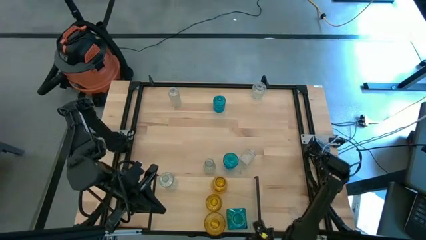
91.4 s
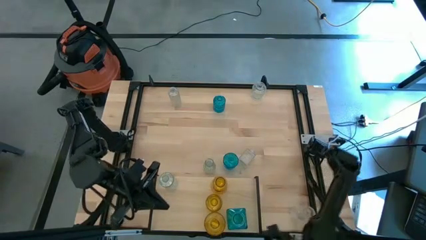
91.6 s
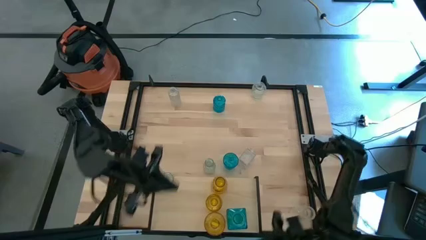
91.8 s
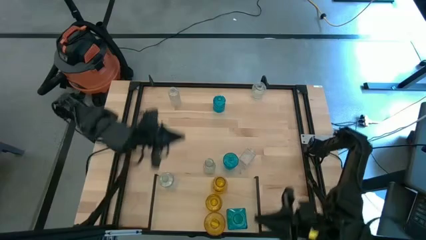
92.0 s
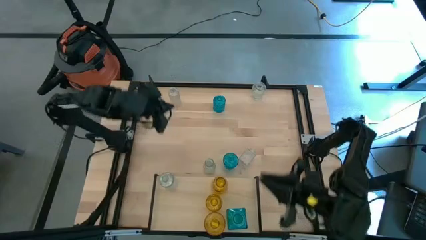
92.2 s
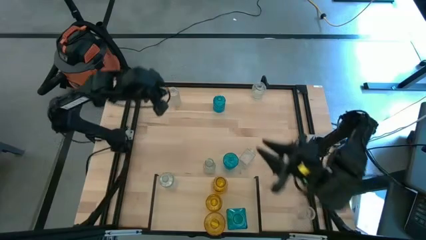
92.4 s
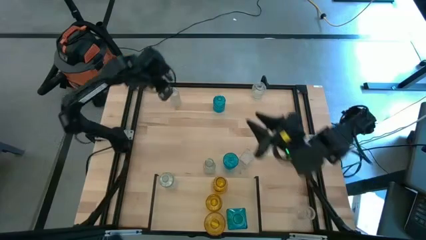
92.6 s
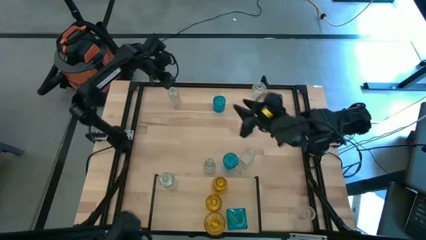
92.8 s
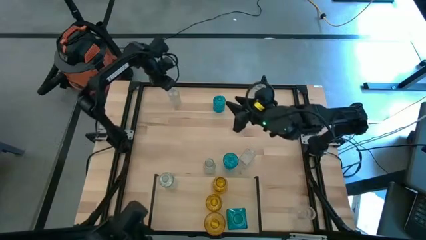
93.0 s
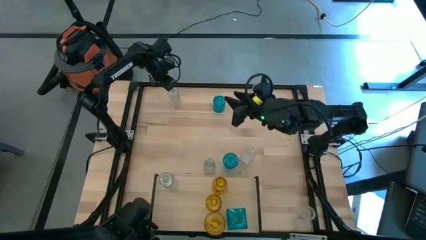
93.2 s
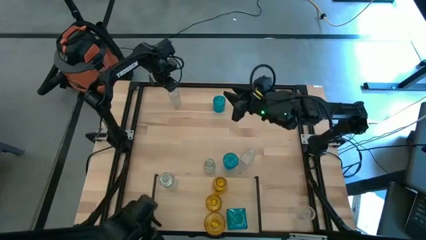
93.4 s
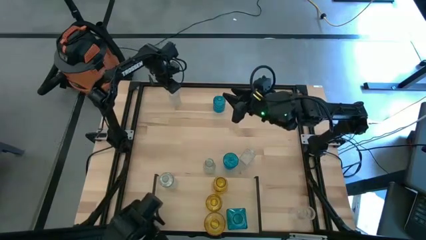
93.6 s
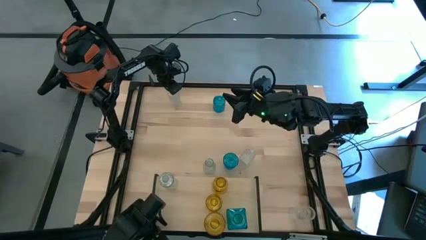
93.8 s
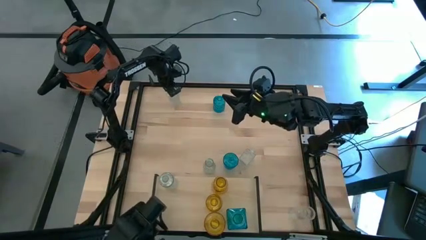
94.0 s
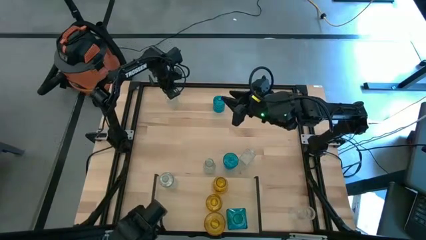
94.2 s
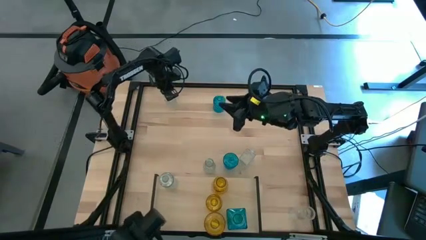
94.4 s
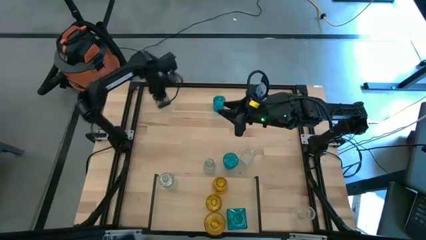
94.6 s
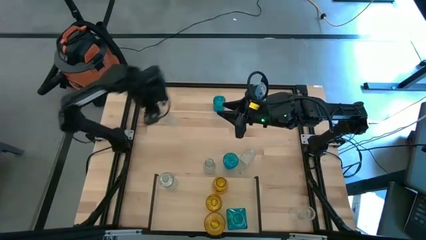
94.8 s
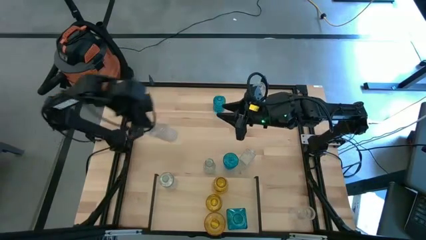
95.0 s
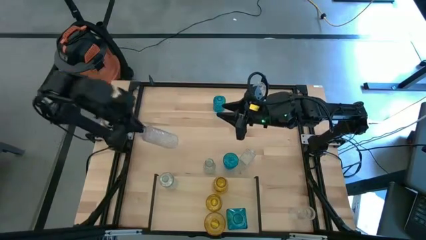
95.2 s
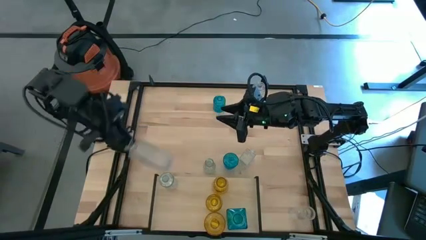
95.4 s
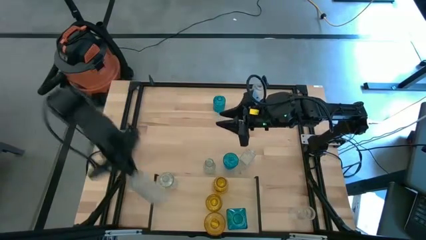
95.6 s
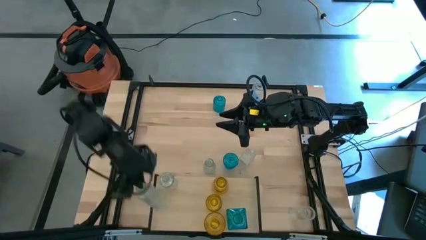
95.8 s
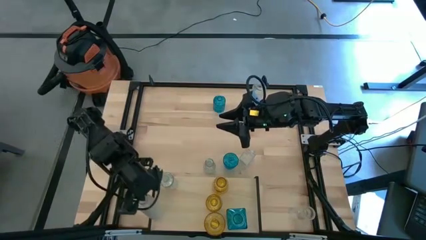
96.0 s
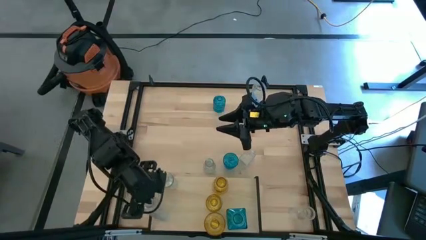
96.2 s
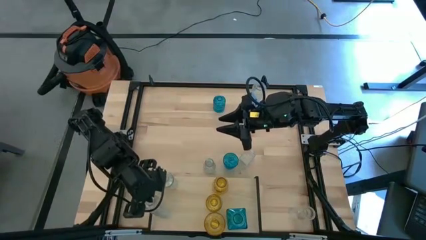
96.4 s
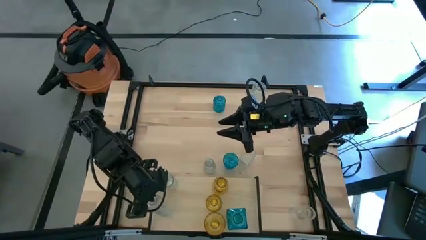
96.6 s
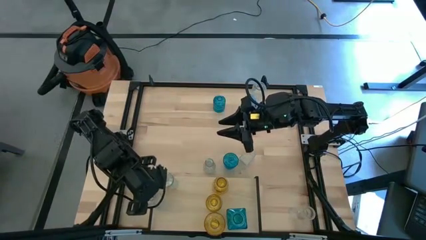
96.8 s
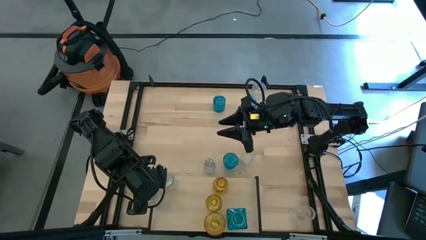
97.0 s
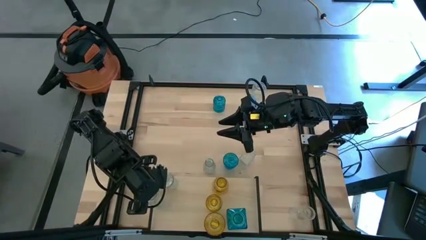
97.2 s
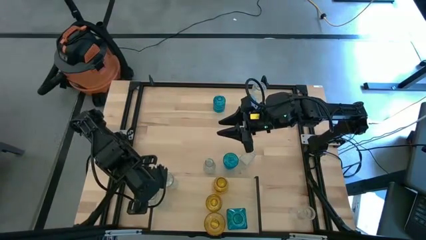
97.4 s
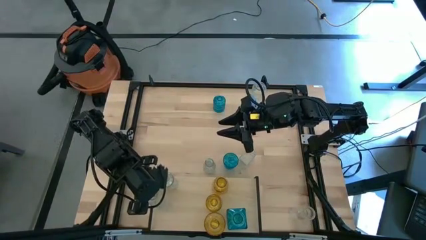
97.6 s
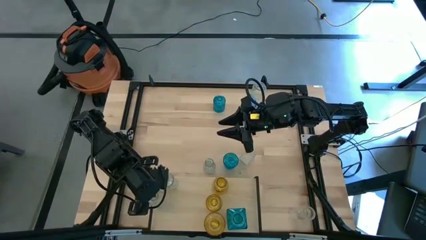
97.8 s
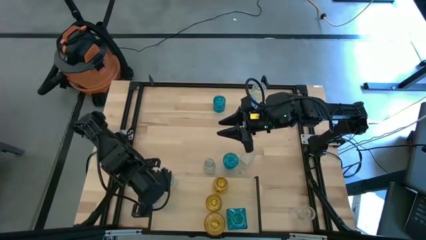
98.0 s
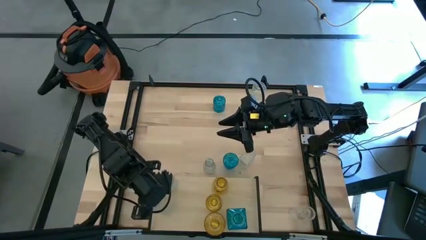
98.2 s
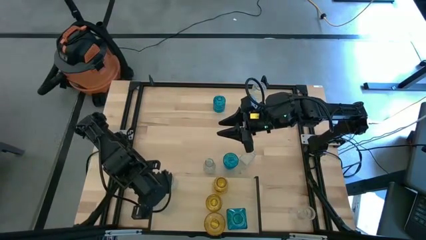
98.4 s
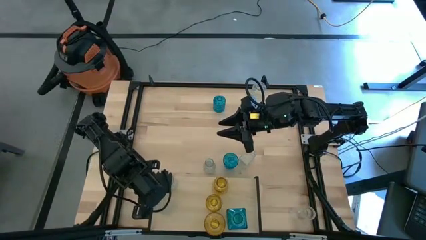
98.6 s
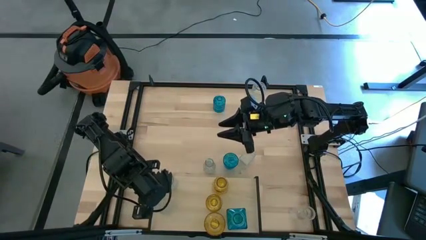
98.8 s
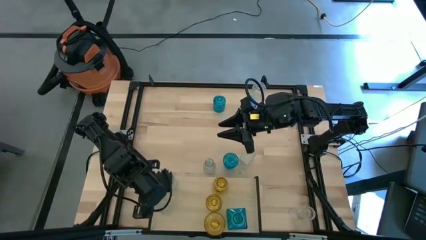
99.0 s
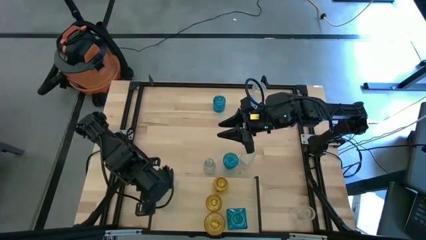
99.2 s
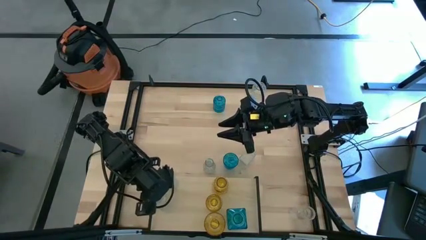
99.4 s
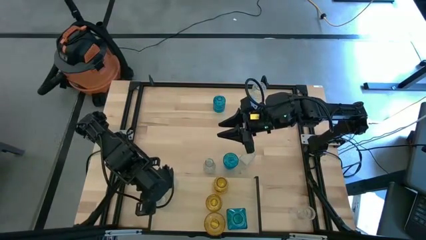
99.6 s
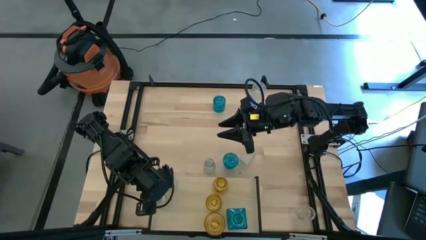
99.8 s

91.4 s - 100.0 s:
Task: sort vases onto shelf
Put the transparent vase on the shelf aligned with the other transparent vase

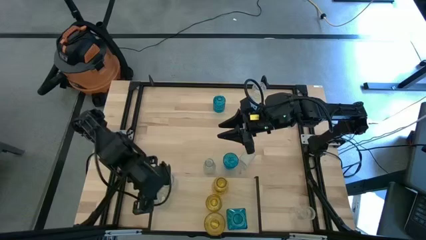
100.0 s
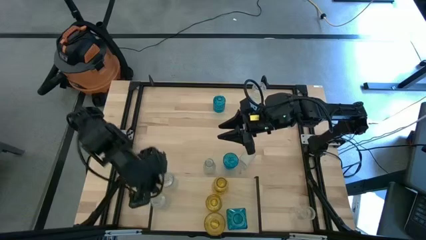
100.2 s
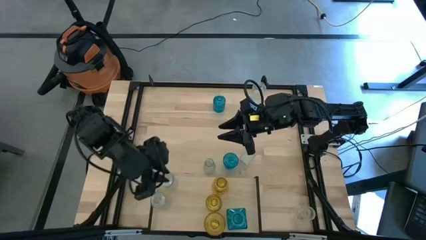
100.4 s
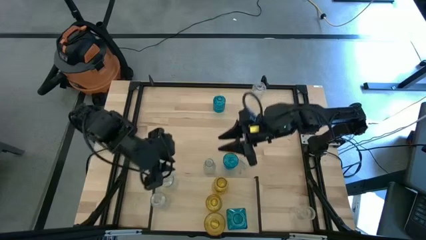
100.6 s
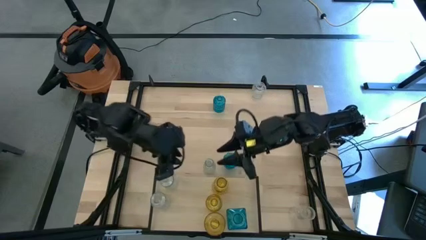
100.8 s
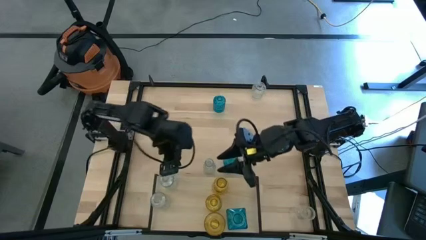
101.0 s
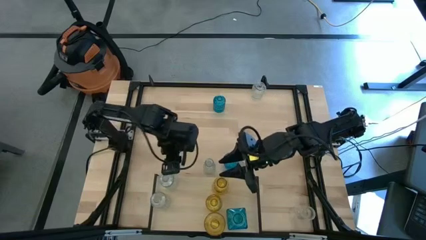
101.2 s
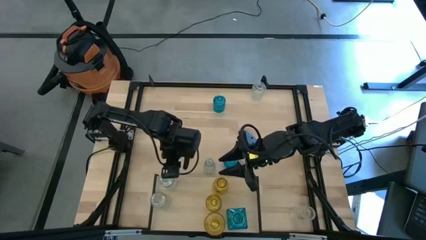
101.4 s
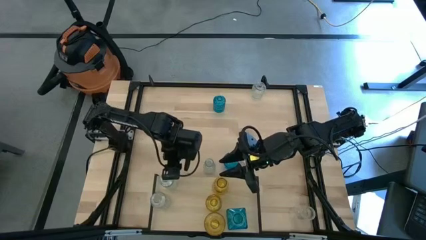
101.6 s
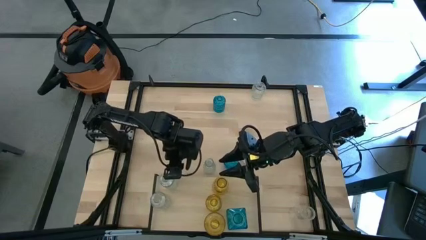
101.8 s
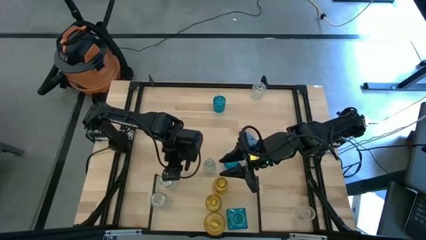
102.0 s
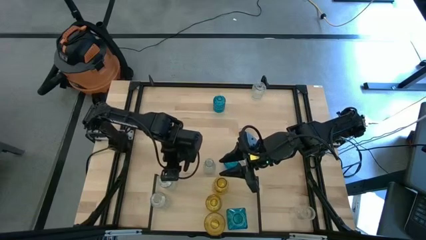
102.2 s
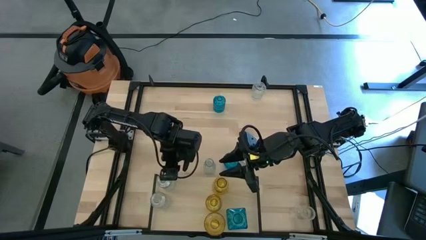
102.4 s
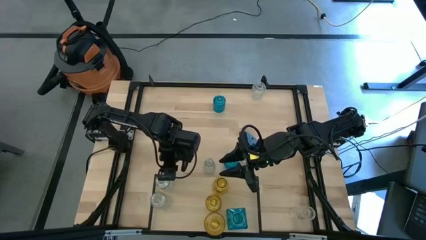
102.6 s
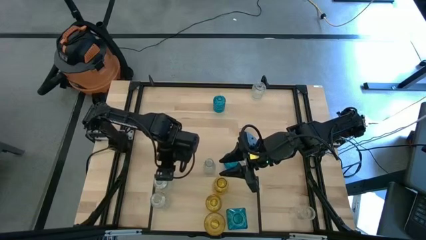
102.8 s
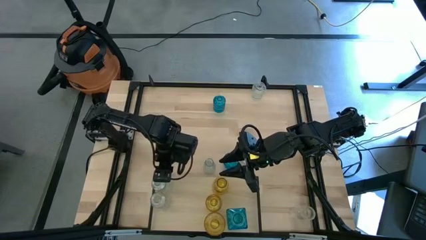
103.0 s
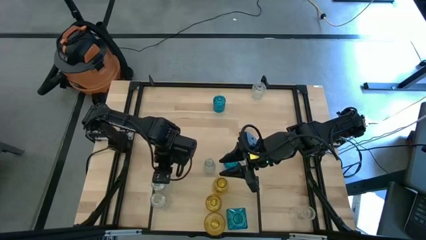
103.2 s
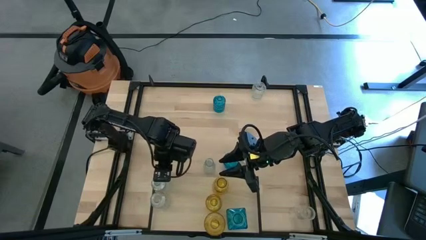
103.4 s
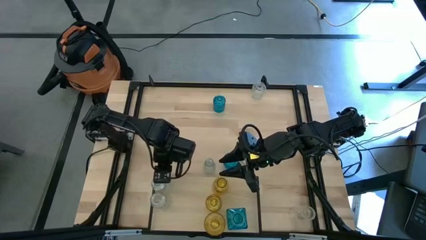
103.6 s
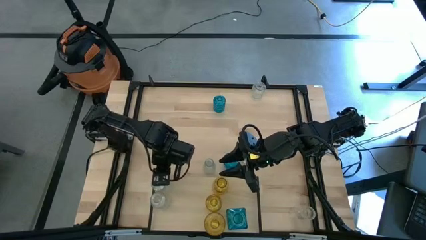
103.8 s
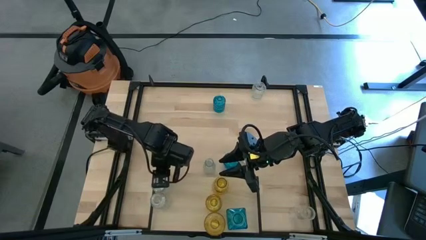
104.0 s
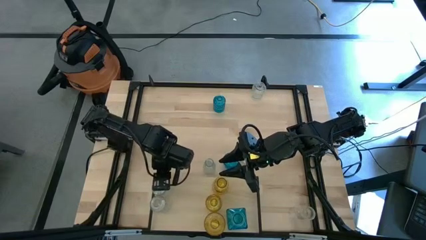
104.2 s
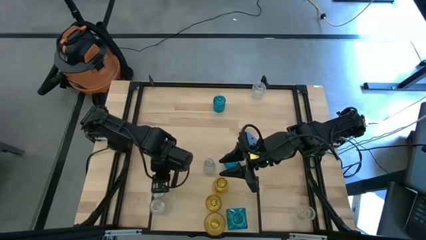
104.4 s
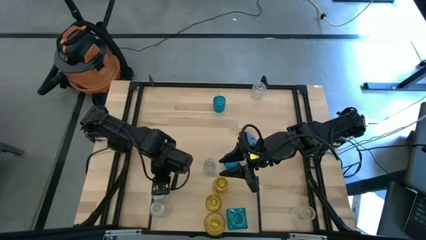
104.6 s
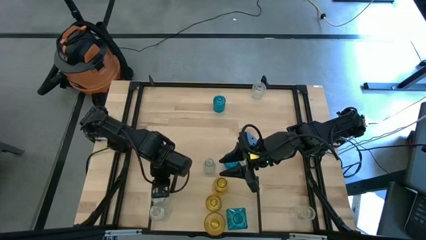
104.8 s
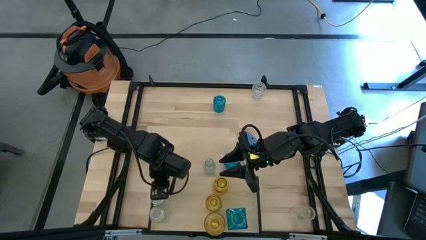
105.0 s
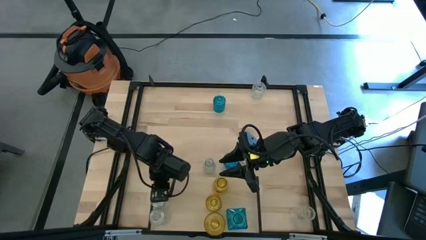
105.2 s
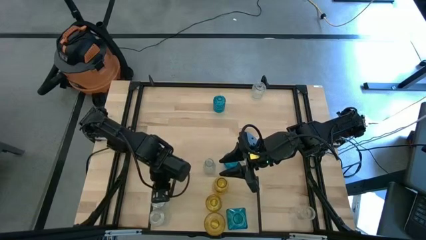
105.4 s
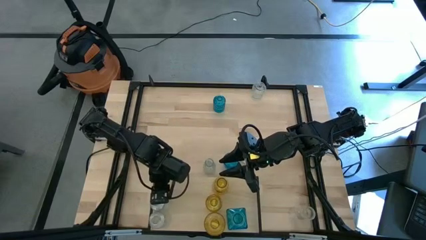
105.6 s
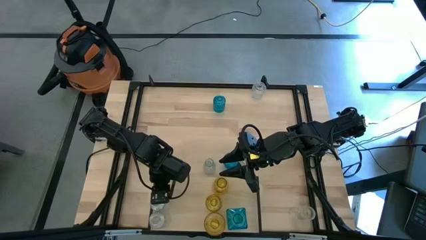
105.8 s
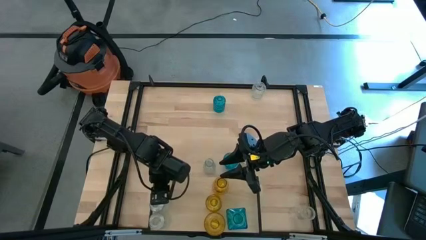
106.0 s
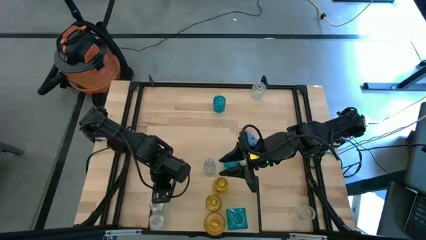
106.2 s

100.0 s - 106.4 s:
Adjust the transparent vases on the shelf

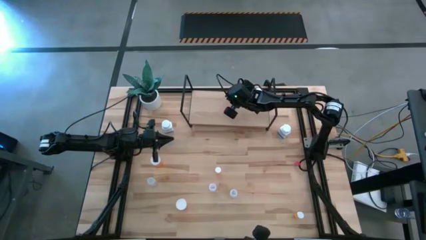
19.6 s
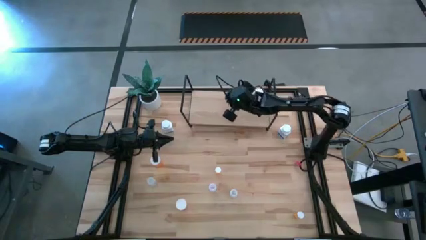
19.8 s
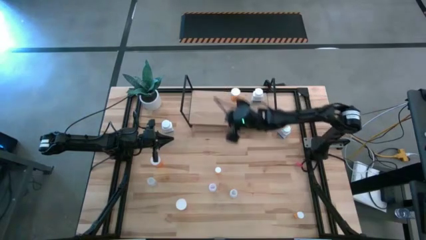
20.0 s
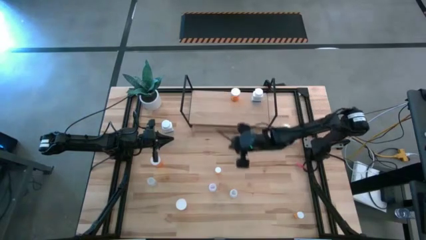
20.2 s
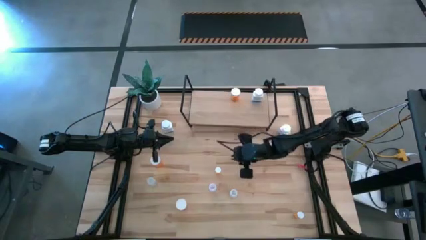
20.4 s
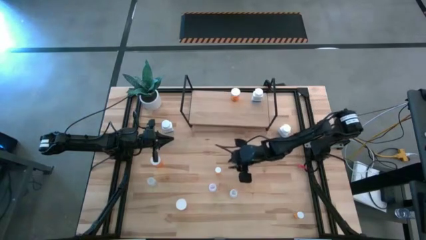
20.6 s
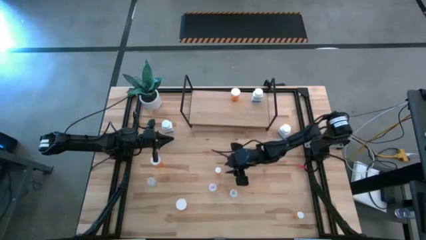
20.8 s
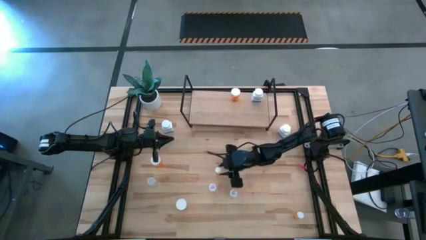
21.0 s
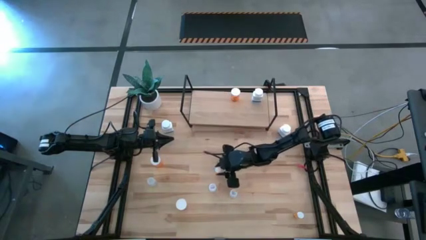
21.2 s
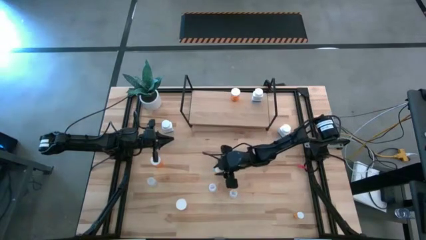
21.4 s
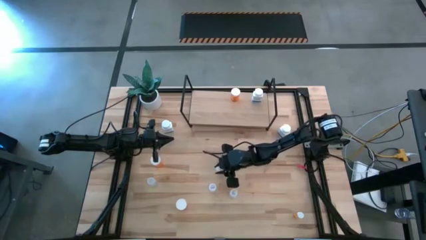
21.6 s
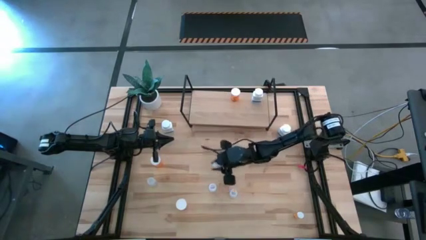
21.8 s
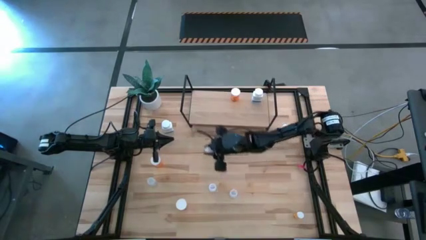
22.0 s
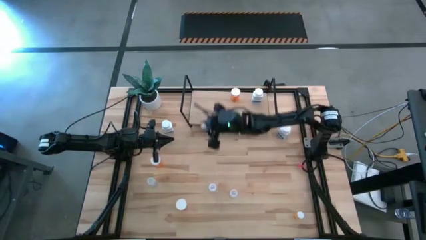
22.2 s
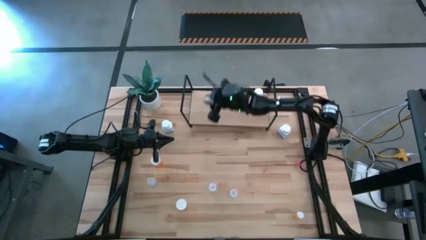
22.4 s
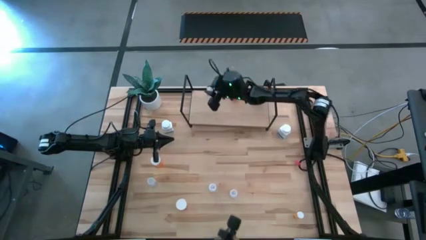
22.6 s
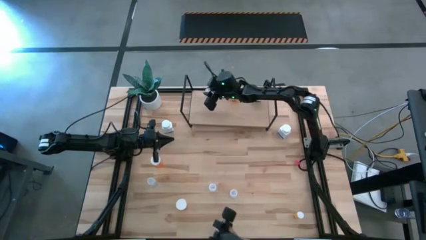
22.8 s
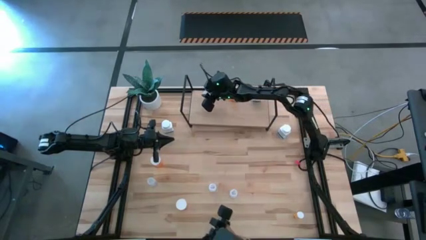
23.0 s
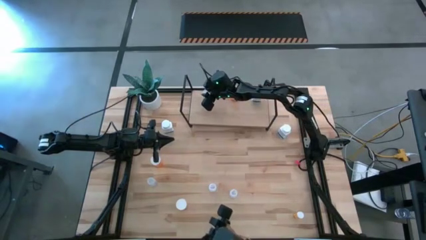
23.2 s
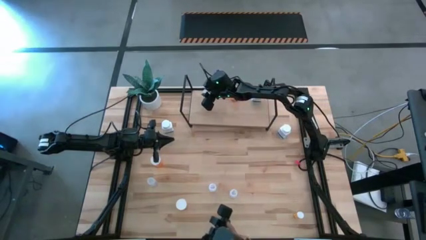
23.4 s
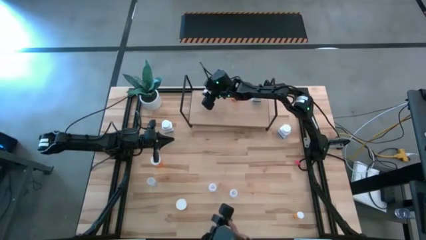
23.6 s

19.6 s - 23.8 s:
Task: Pick and place medicine bottles onto shelf by color
Put the top small orange medicine bottle on the shelf
